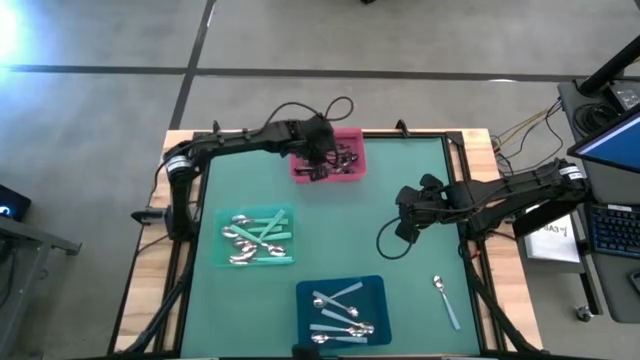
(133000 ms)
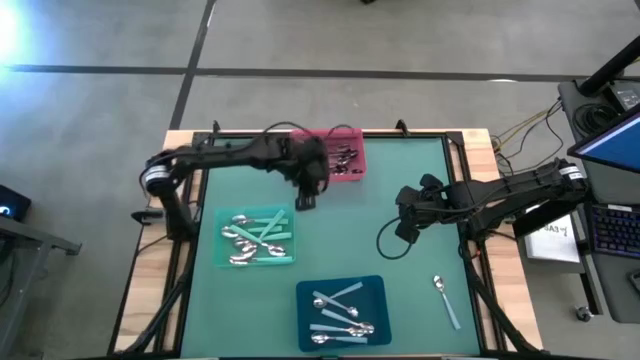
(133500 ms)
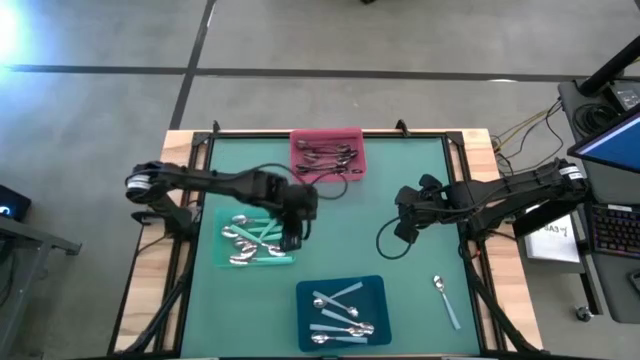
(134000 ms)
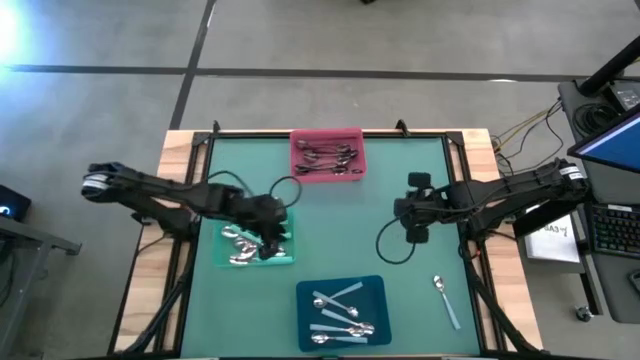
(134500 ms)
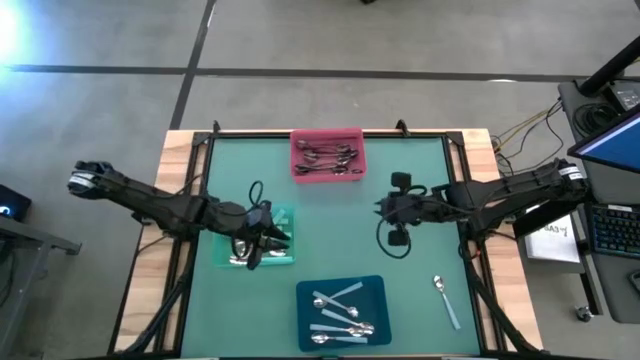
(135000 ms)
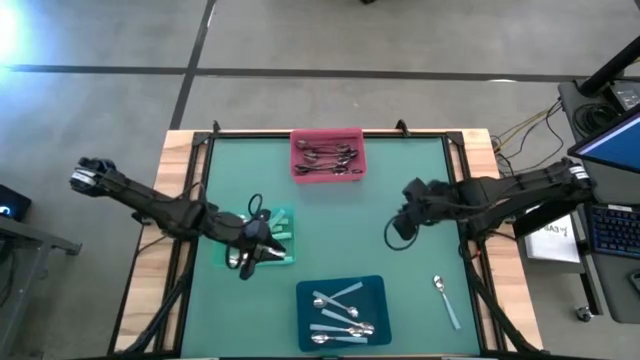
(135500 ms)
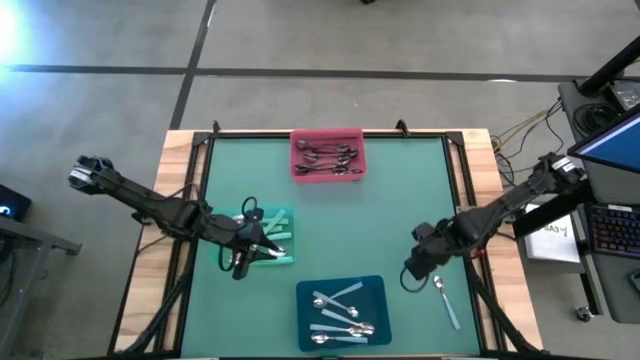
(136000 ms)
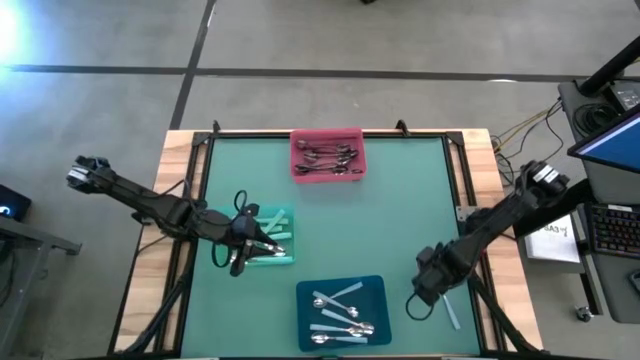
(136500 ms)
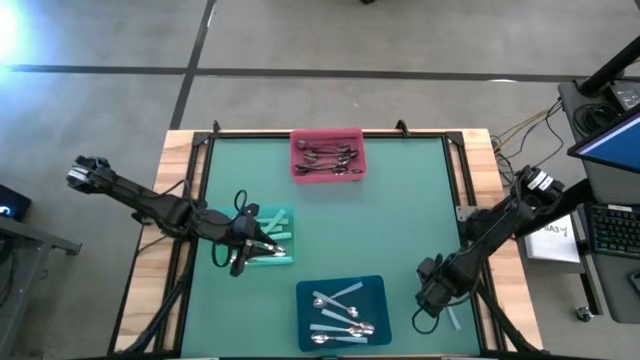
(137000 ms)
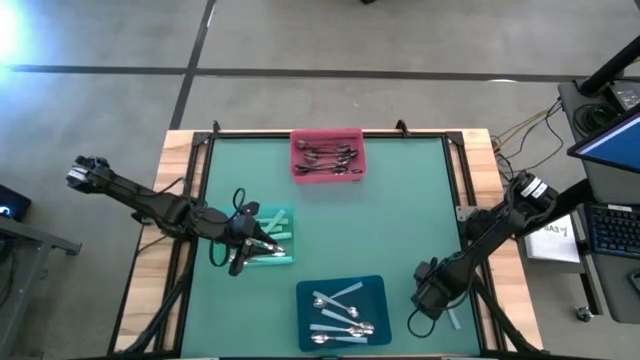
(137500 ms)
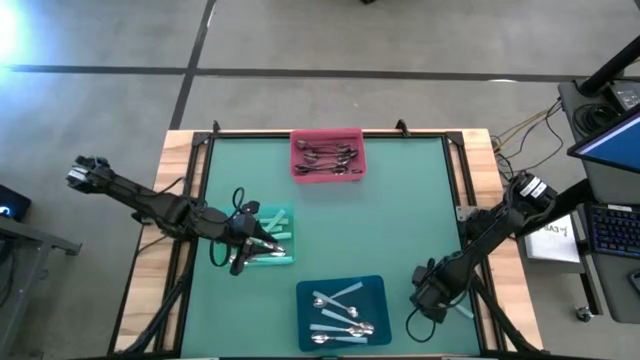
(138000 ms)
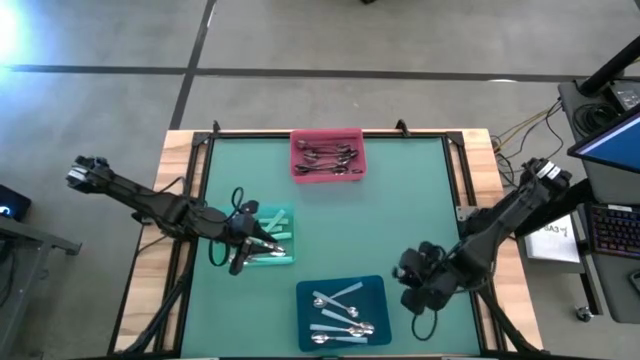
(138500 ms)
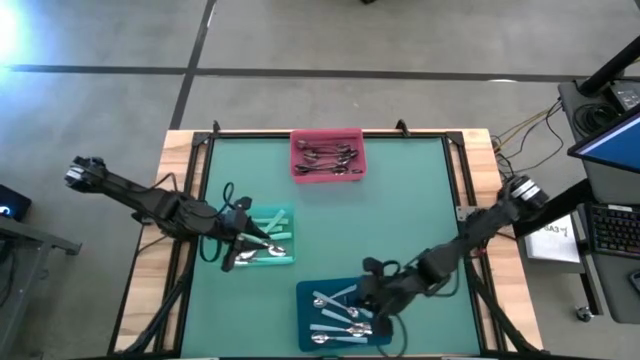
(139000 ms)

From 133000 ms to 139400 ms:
Task: Sort silverware by color (type)
Put the blue spoon into the blue bin

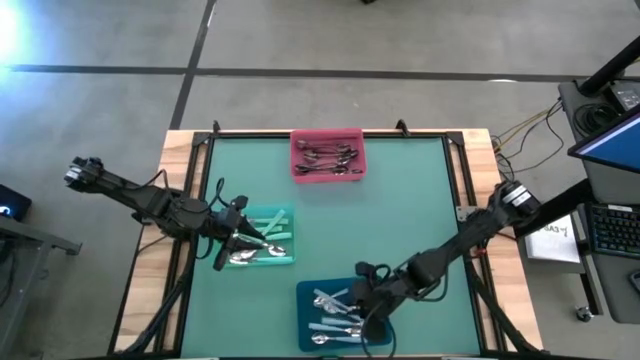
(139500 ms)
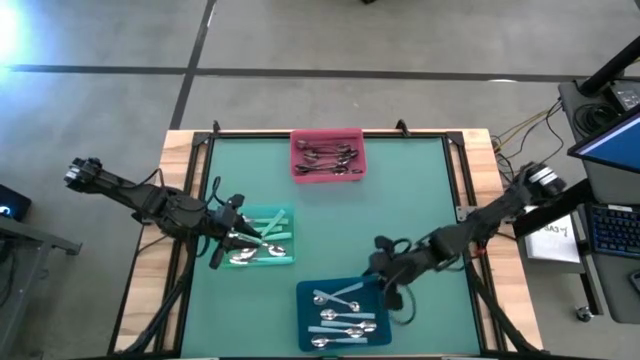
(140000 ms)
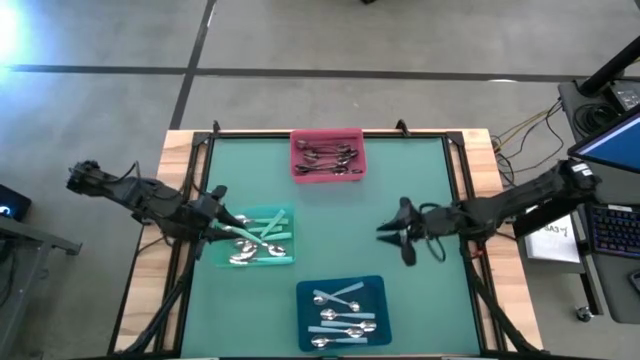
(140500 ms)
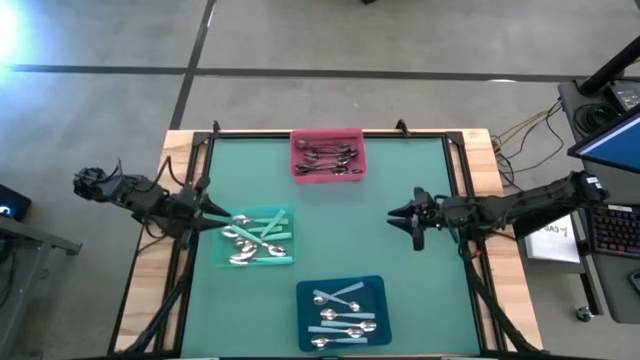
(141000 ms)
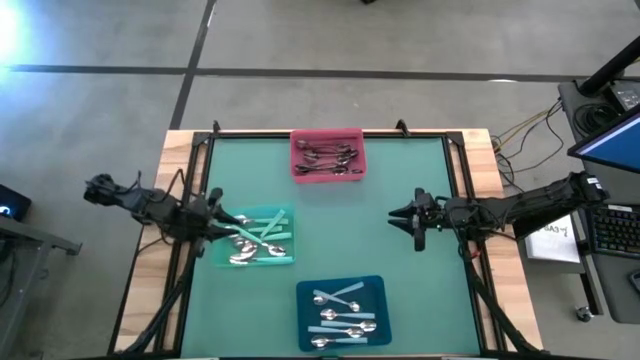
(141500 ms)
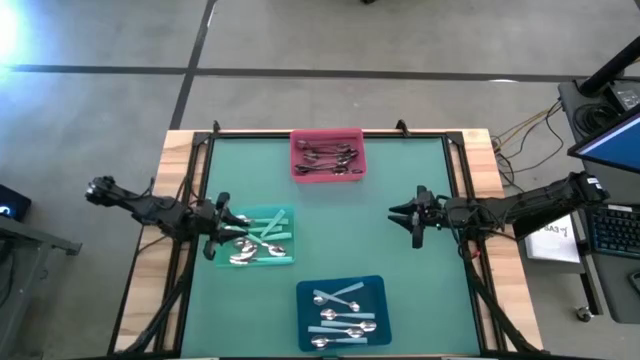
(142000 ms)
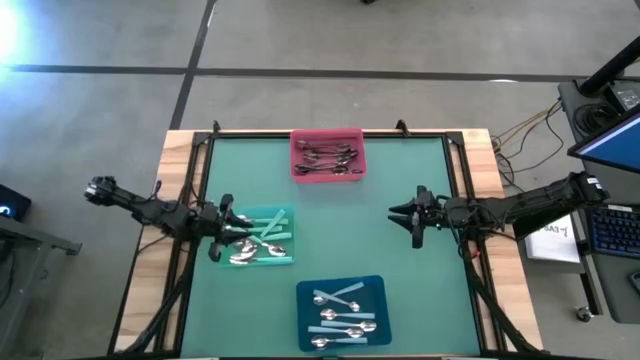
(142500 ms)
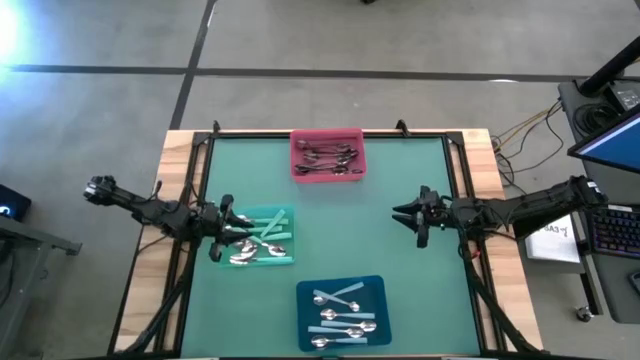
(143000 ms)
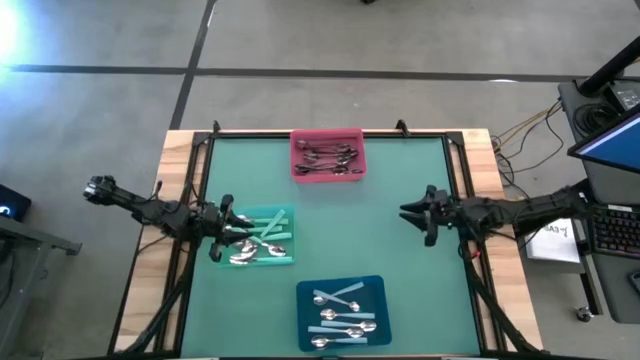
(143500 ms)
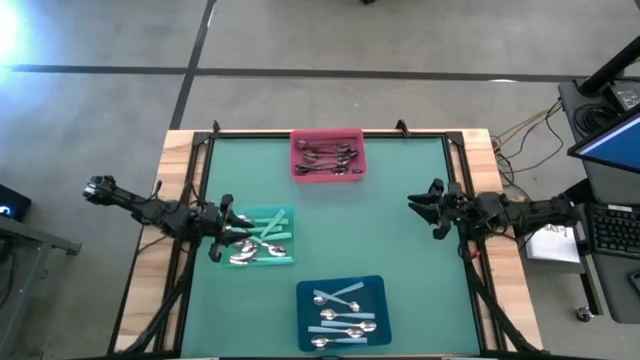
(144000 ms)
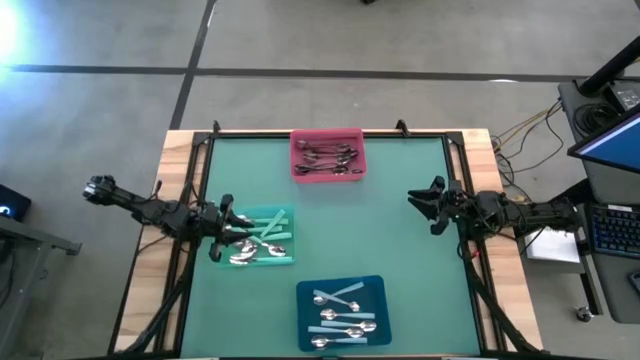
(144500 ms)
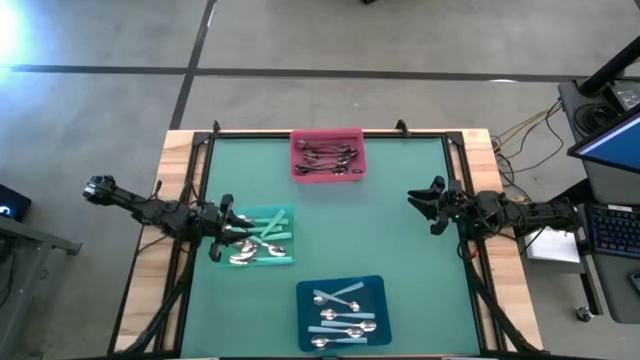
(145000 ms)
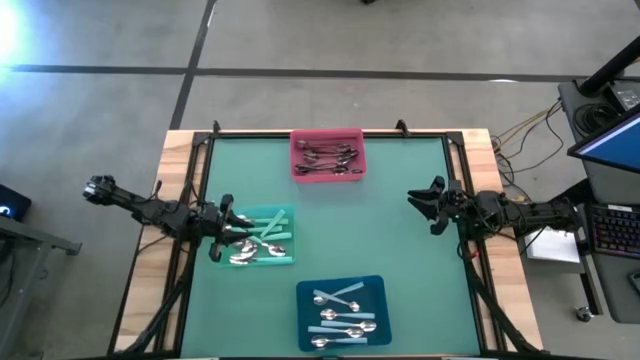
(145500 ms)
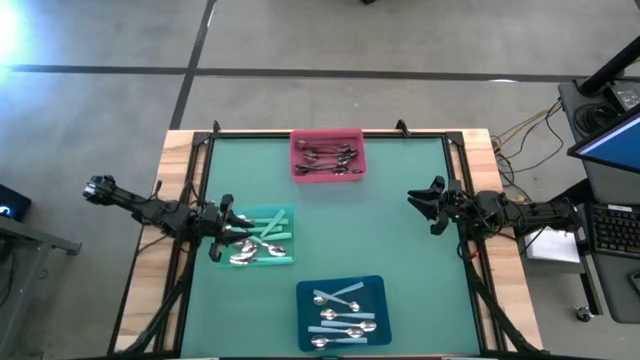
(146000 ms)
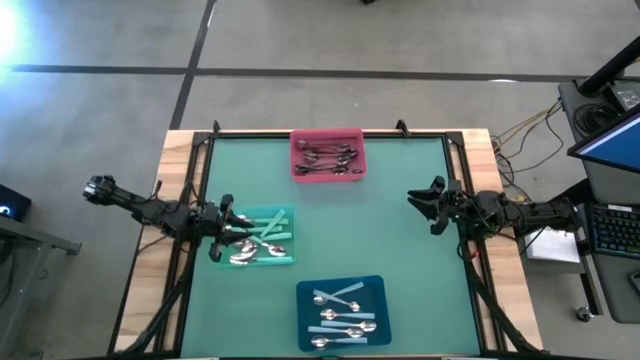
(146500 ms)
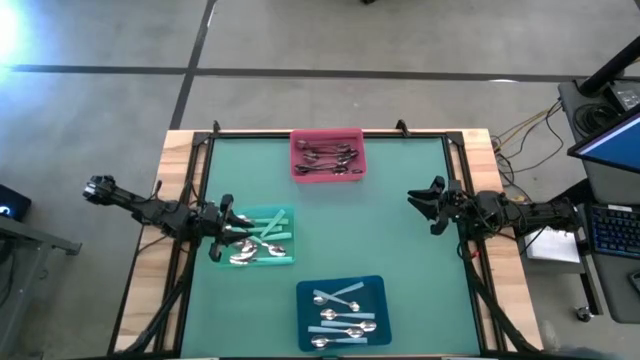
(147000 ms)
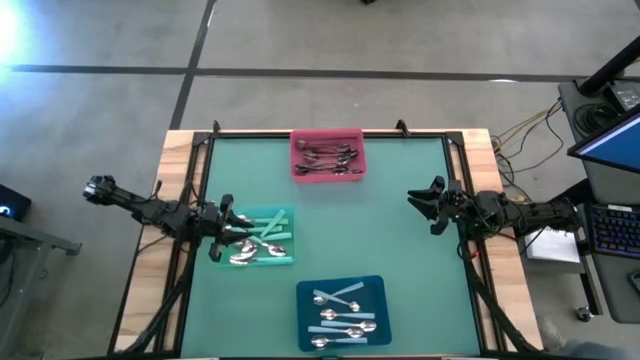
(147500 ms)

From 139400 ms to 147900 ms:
Return to Home Position

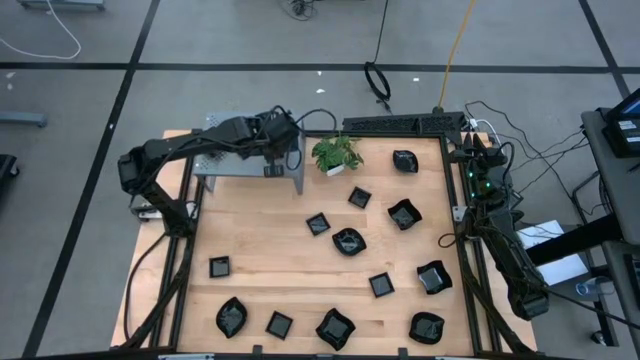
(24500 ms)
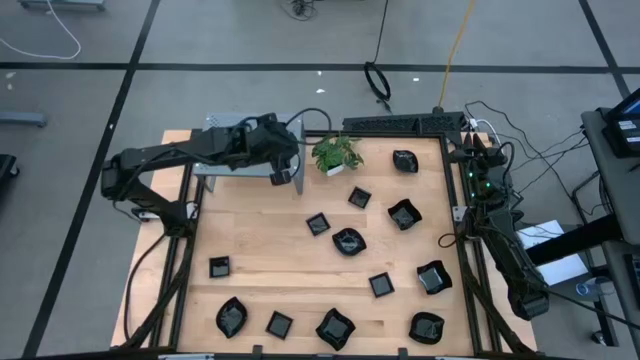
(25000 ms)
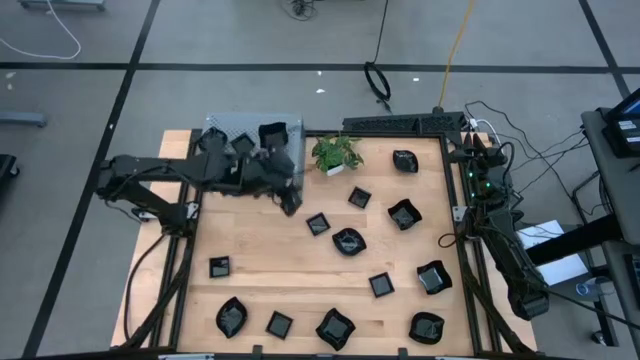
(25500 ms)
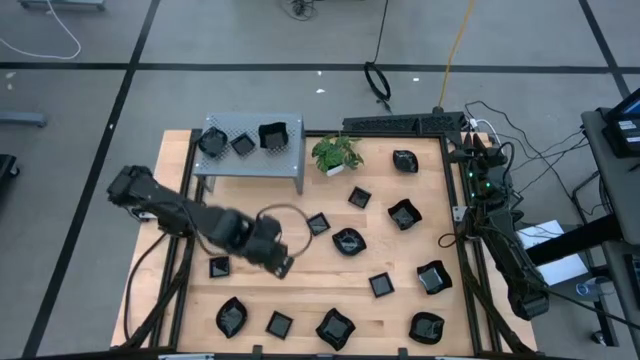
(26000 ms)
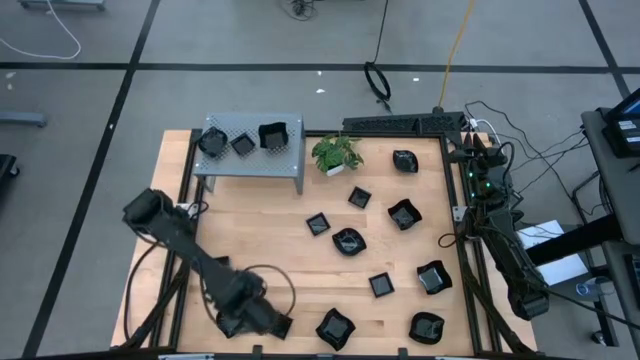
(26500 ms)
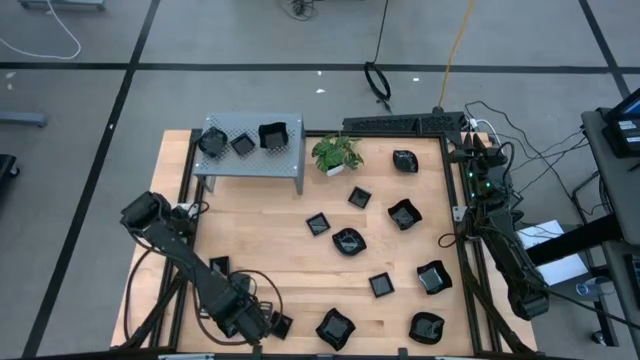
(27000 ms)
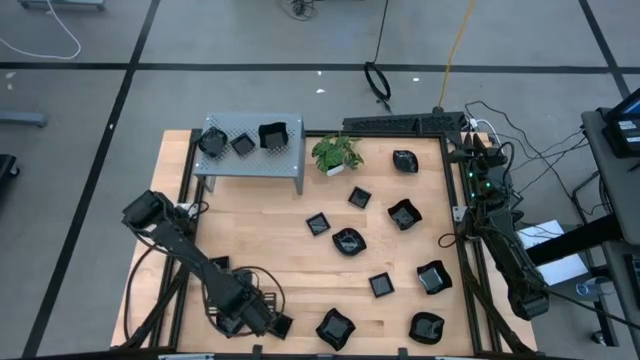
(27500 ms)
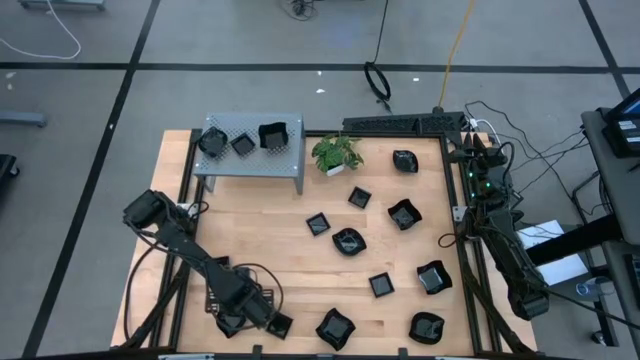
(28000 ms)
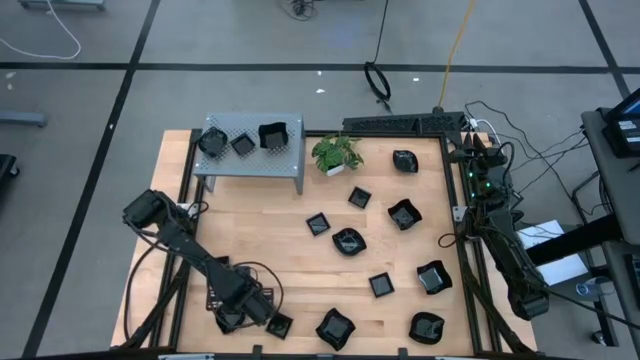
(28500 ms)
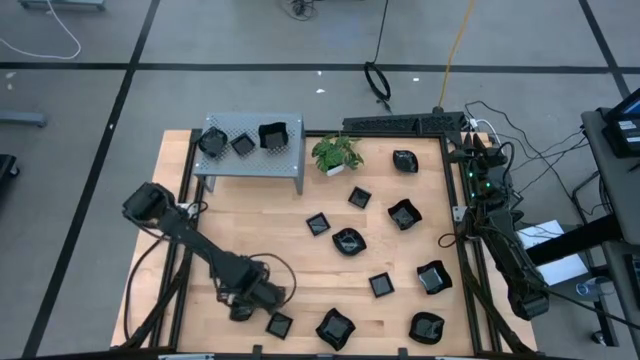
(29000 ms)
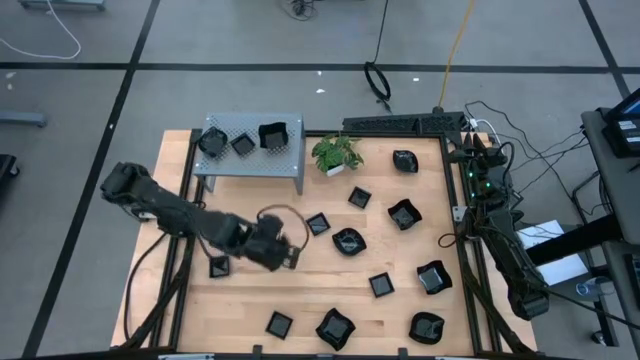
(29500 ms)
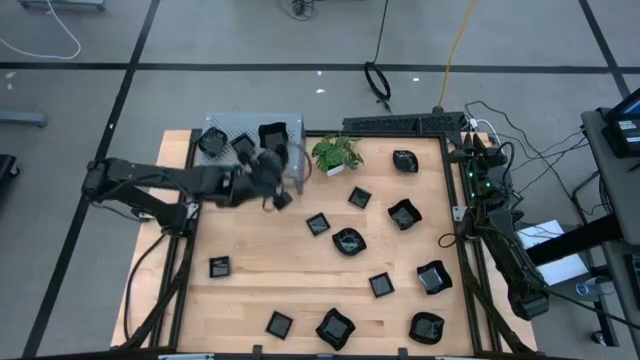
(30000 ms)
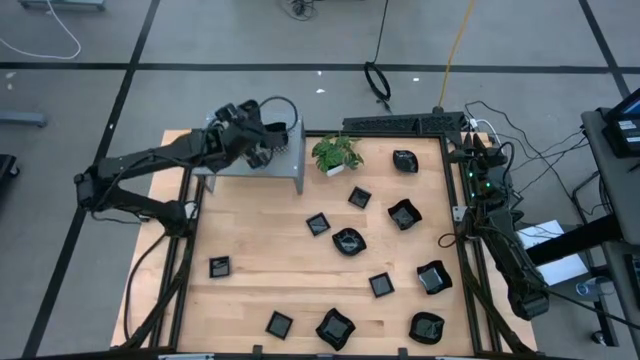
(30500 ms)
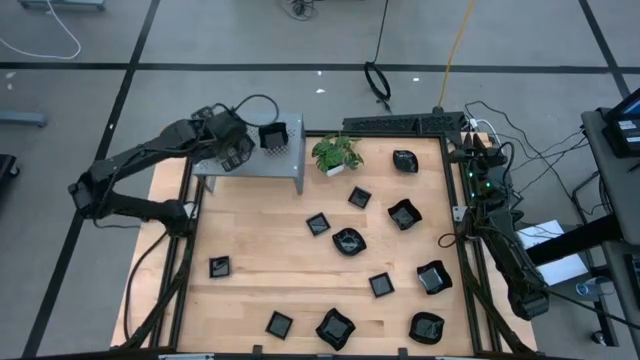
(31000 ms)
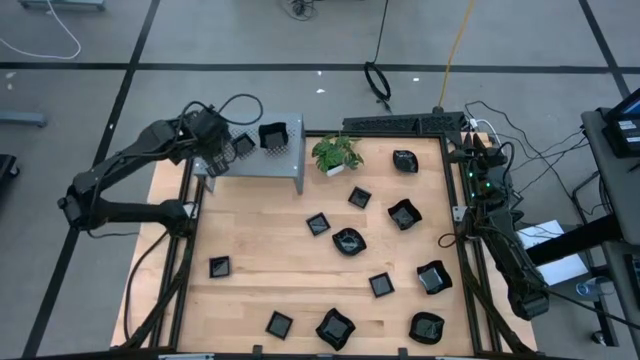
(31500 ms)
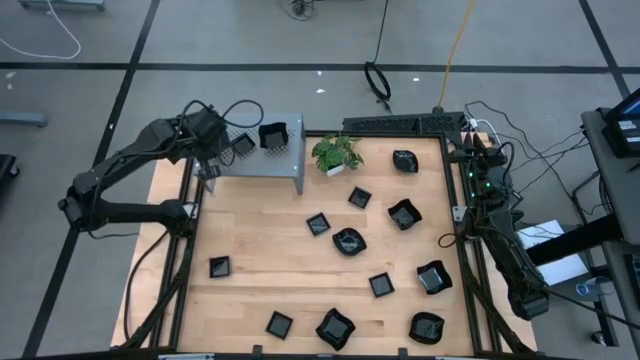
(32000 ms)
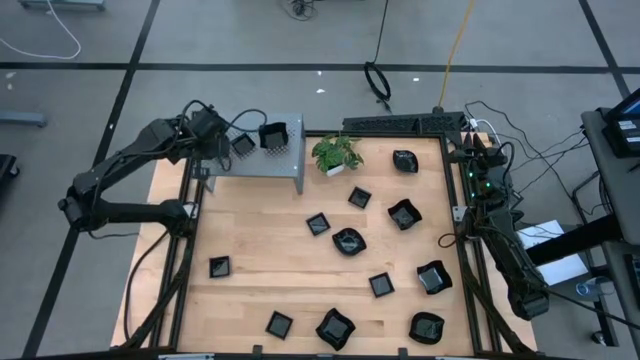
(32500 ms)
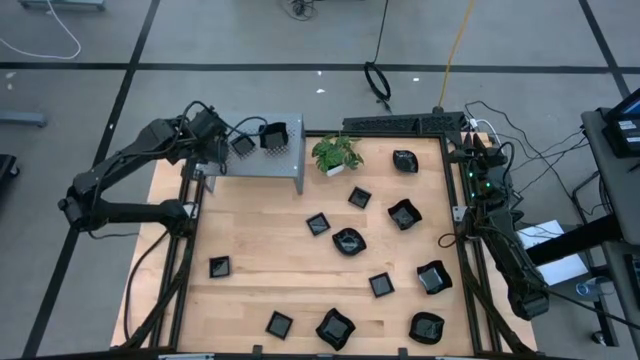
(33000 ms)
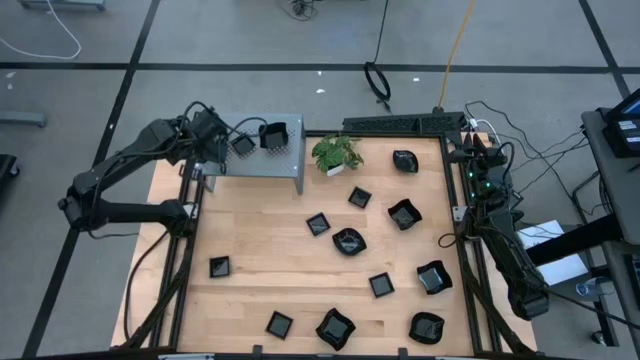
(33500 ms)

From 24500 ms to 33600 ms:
Task: Pick & Place Mini shaped plates
Stack the black leaf shaped plate on top of the other black leaf shaped plate on the shelf
